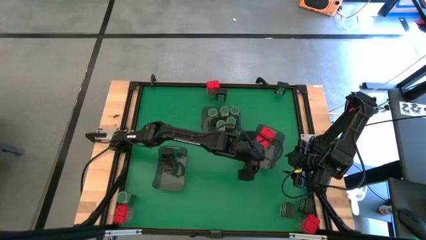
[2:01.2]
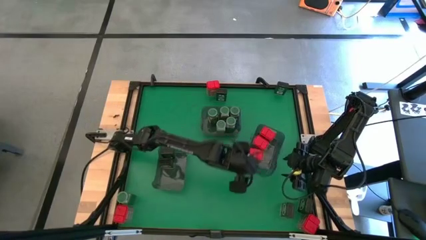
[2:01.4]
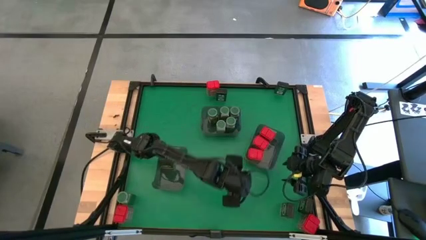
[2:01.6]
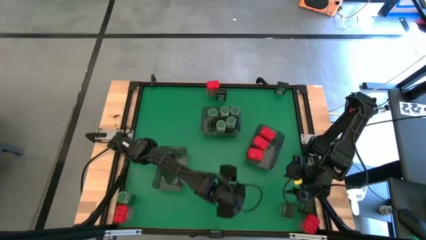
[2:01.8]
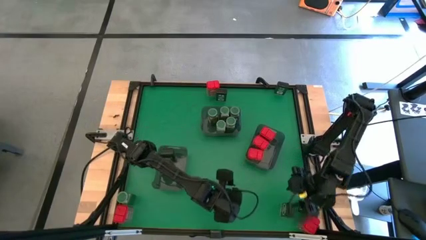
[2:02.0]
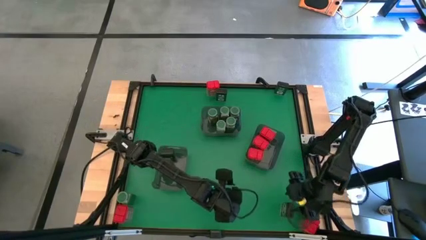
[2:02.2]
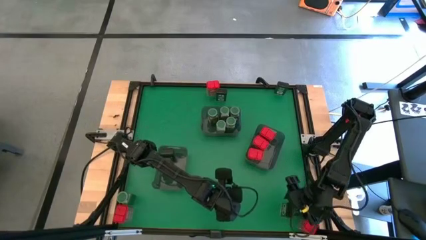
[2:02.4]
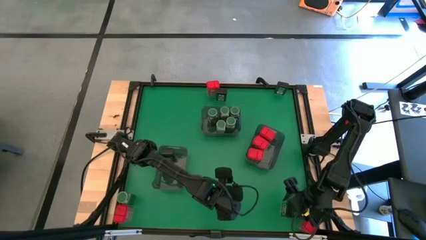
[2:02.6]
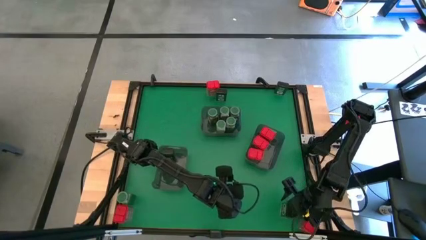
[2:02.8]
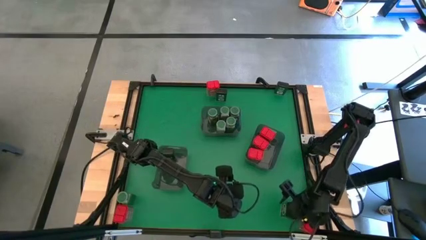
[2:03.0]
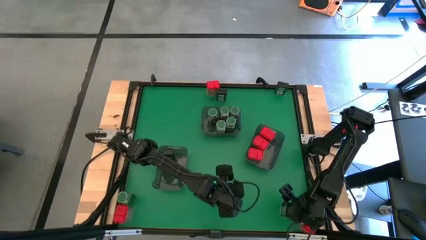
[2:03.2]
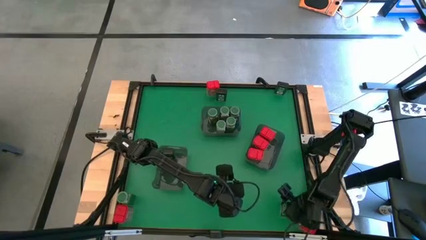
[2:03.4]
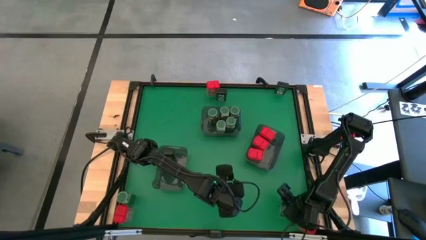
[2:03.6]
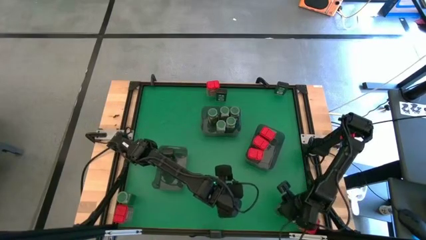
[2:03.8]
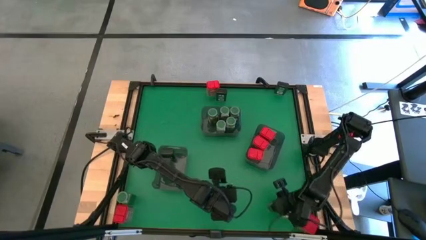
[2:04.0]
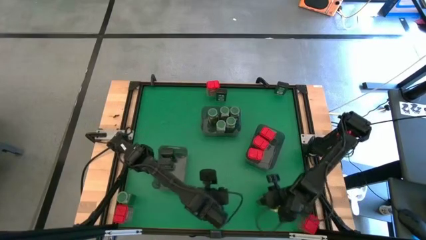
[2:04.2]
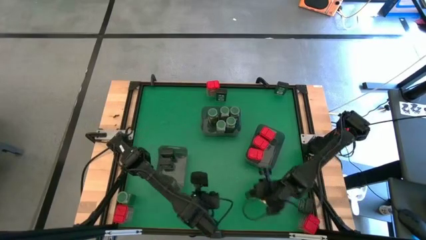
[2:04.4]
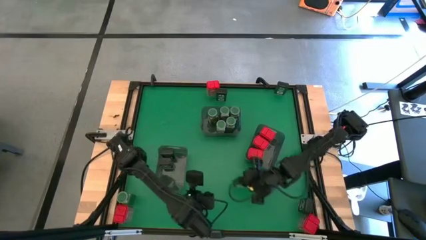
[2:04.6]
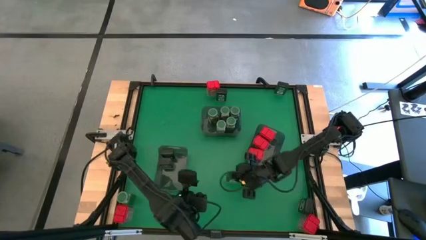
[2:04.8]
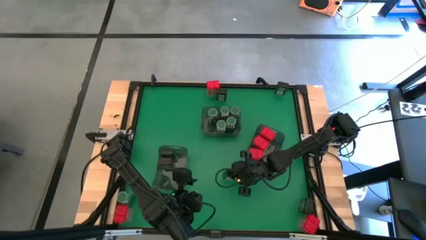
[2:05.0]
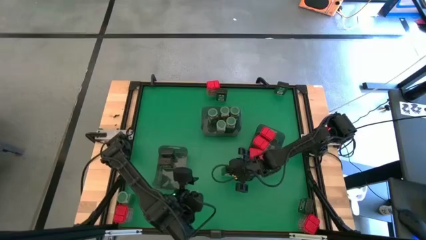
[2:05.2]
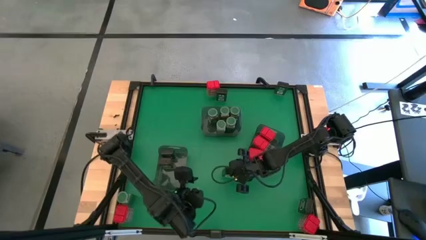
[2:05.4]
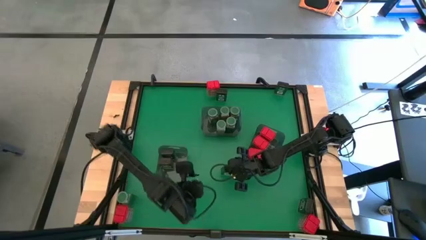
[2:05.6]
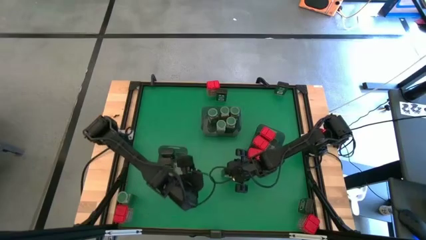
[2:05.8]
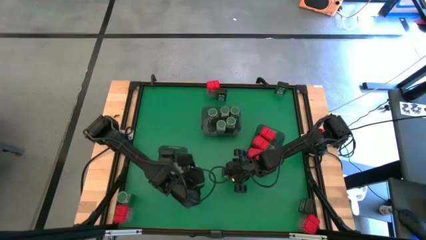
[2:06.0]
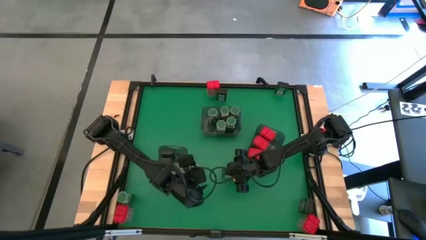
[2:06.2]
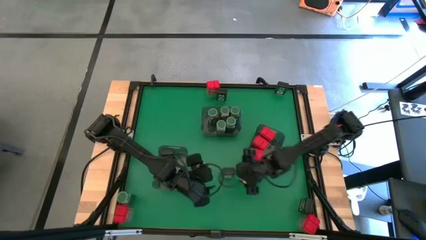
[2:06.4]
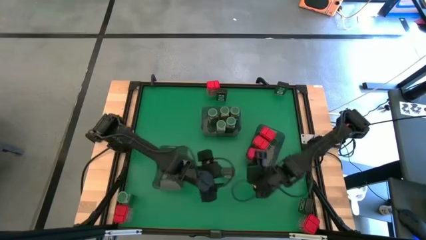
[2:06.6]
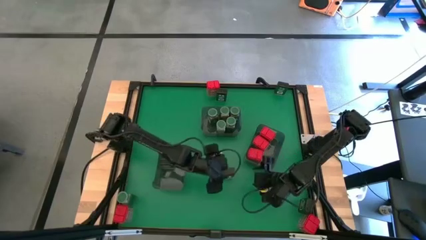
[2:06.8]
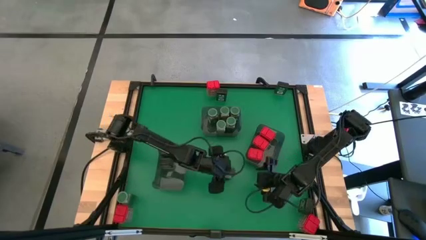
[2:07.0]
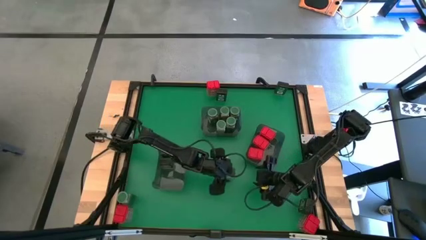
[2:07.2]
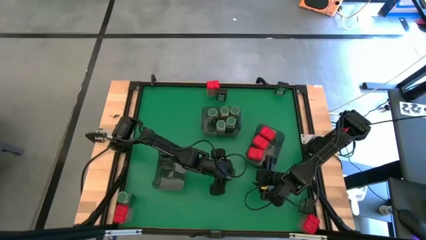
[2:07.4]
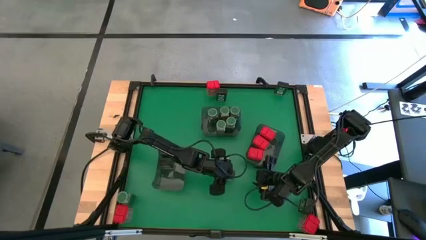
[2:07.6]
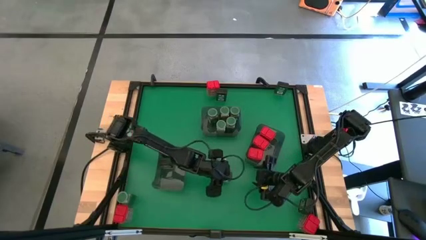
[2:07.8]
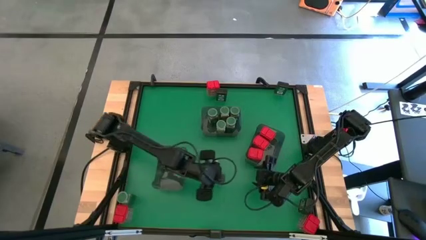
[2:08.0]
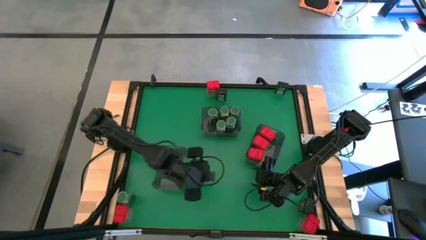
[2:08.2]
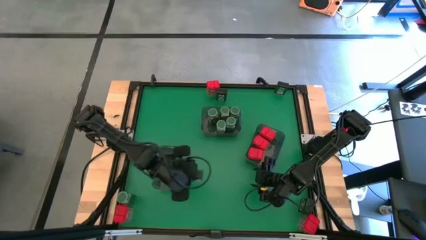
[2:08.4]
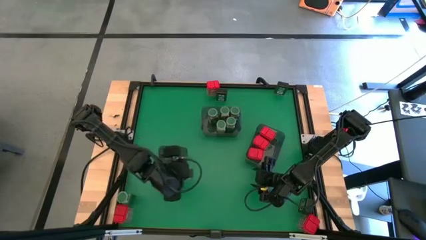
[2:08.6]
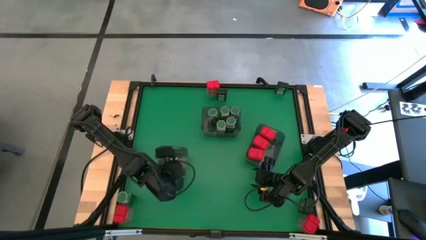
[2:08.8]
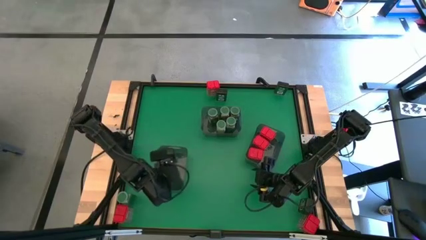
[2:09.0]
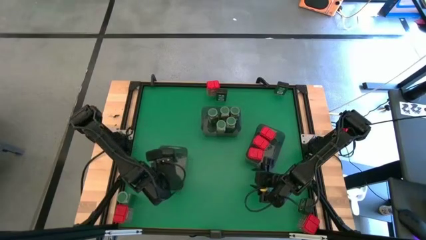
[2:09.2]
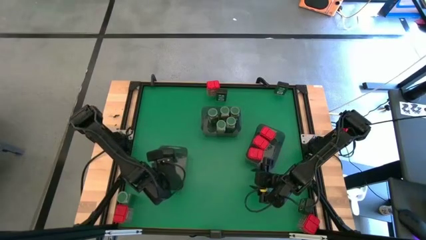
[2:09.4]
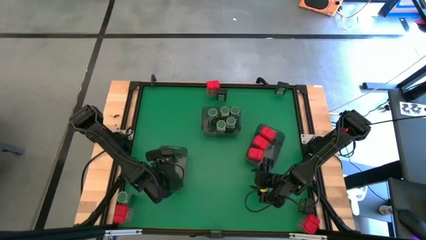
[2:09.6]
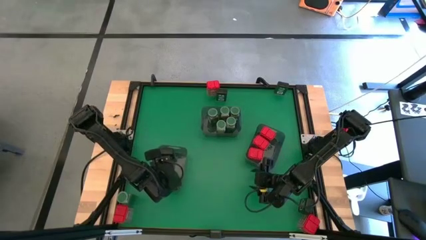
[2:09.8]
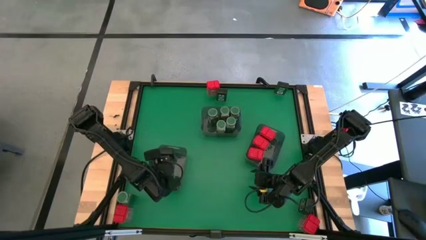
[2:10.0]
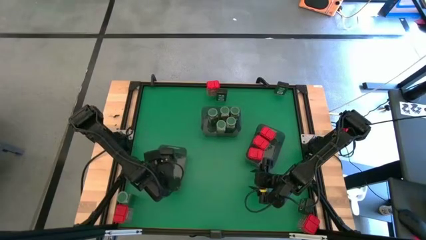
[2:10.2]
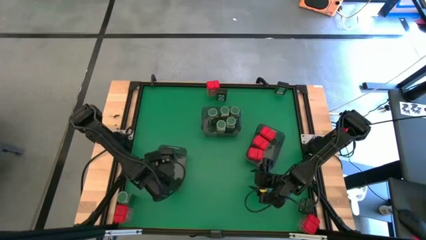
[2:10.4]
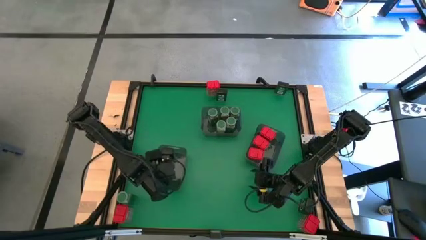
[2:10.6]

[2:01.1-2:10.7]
Task: Sort spices by type
Put the black seasoning can into the left black bin

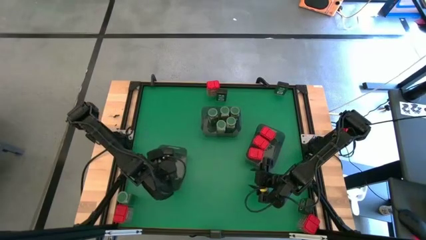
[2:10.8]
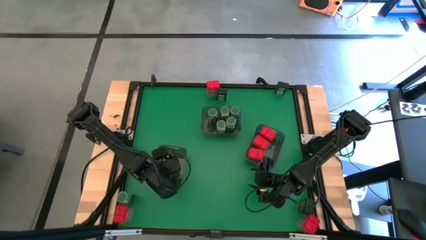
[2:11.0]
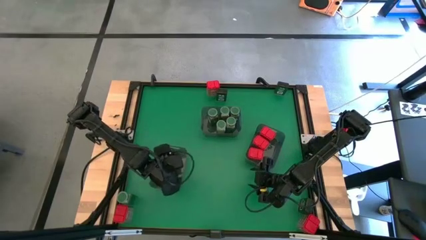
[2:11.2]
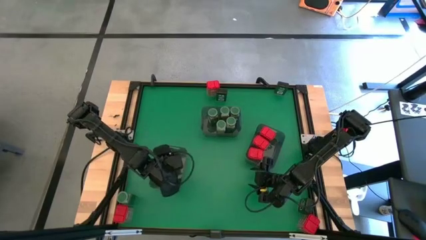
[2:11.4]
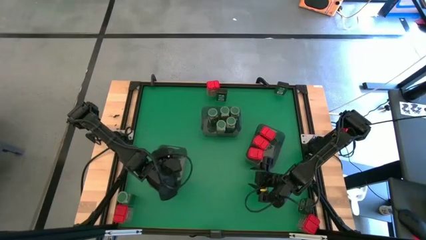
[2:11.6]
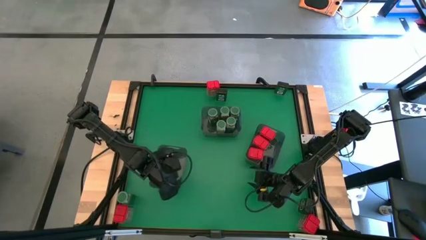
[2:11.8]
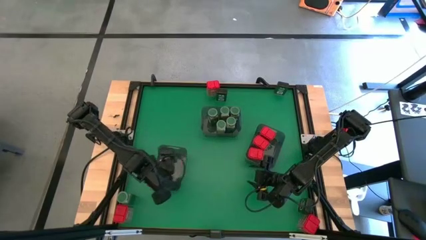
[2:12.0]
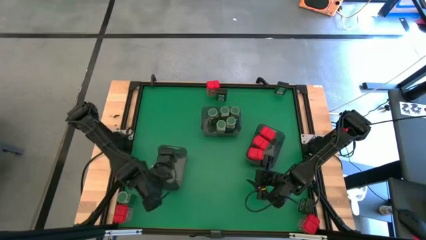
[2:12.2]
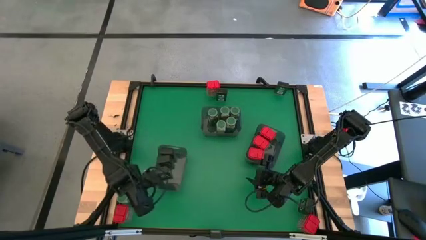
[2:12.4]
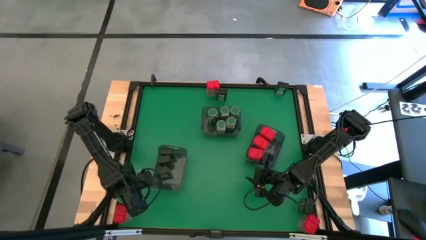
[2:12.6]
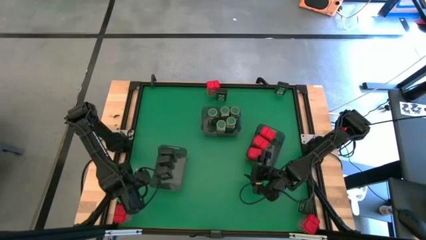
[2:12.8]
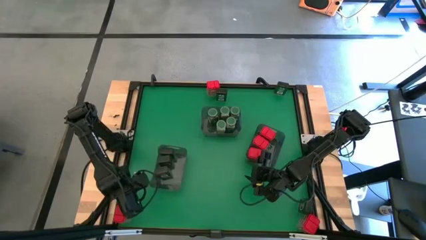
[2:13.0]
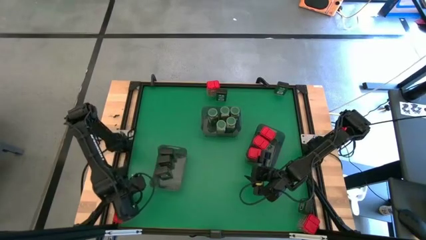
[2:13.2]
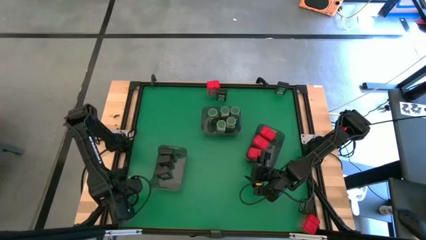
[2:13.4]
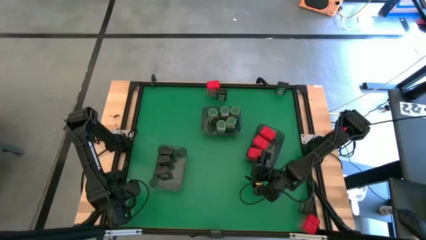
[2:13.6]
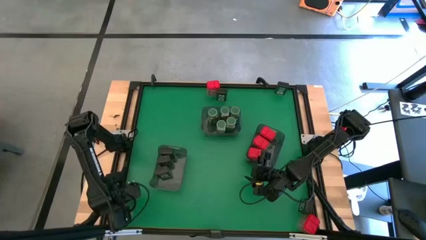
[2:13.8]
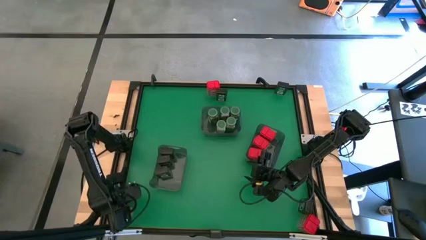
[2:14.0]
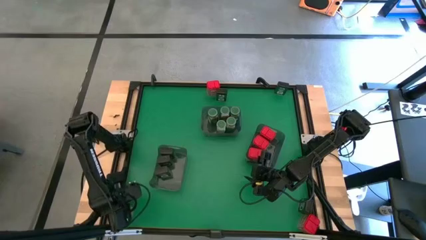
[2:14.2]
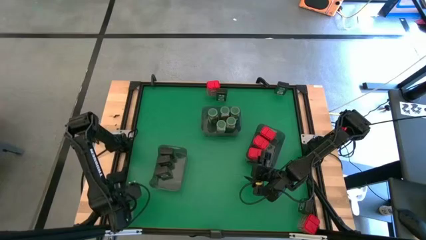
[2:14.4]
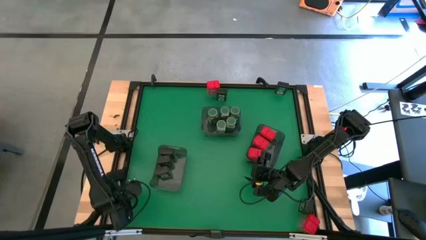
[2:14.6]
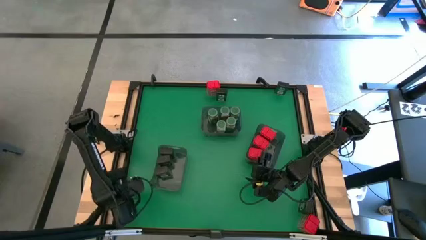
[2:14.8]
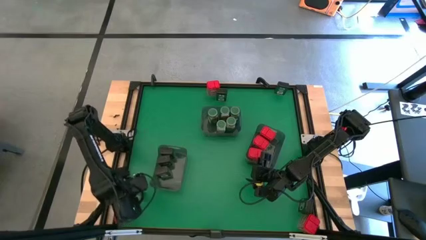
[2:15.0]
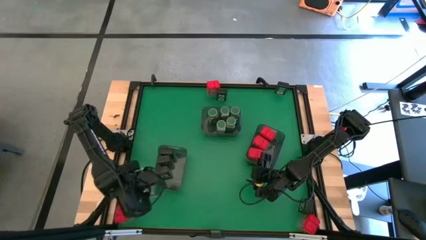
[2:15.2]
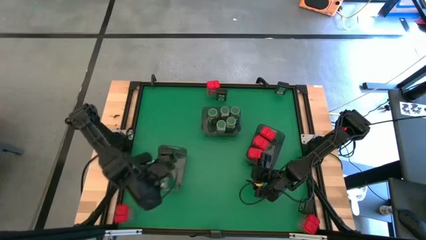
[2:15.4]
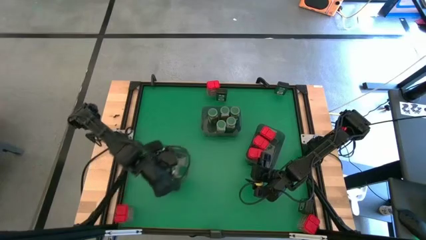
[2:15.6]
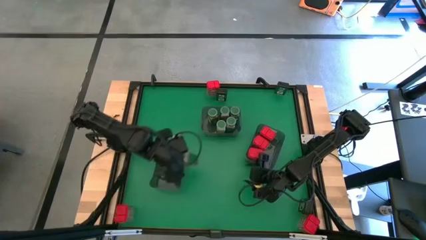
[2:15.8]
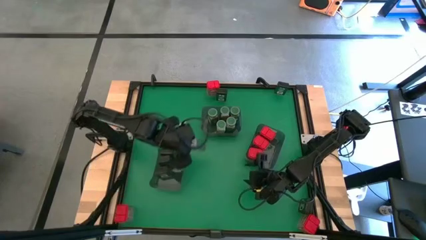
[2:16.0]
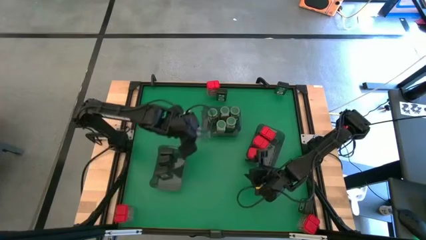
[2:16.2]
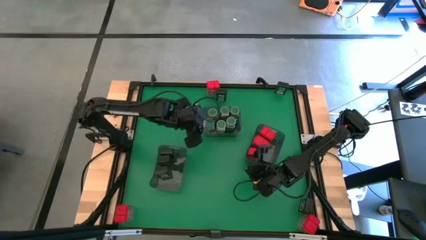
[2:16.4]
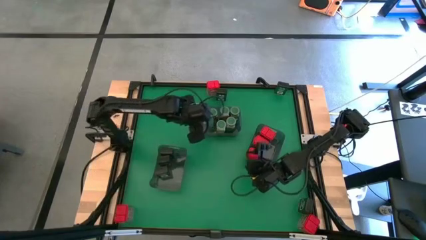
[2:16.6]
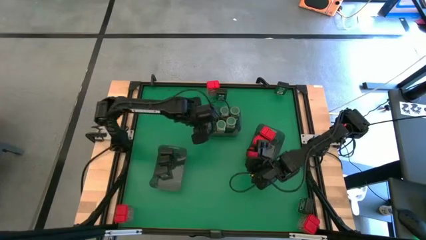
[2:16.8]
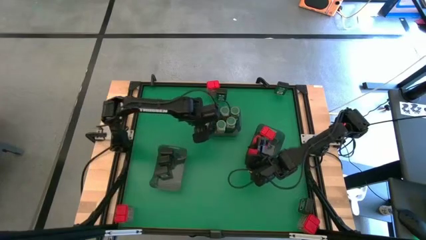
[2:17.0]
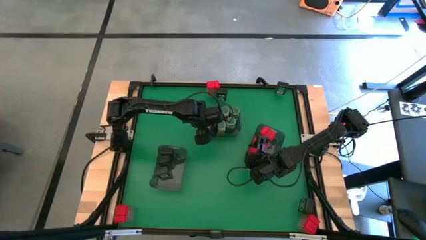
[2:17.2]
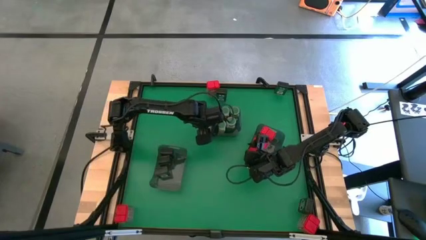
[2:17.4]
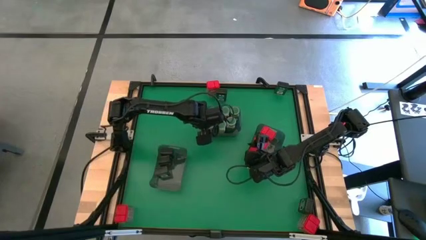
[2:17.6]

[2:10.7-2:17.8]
Put the green seasoning bottle into the top black bin
